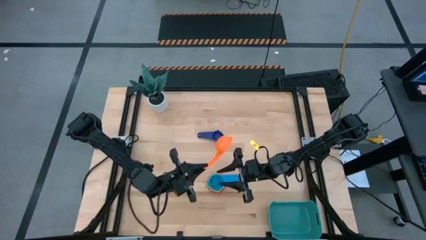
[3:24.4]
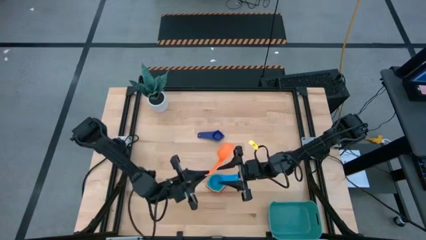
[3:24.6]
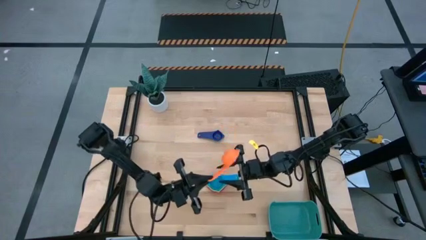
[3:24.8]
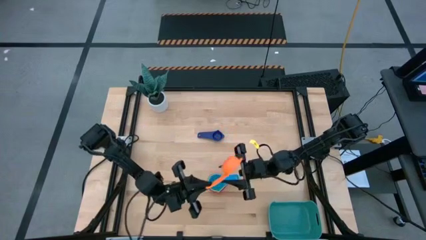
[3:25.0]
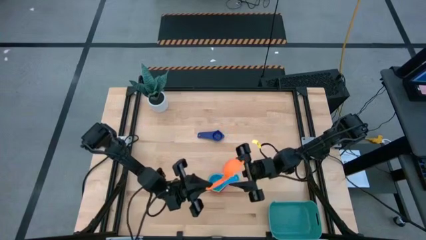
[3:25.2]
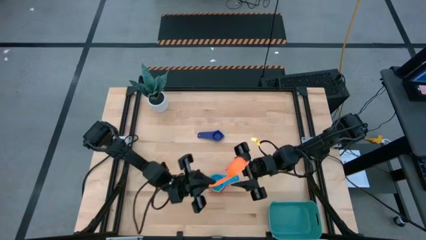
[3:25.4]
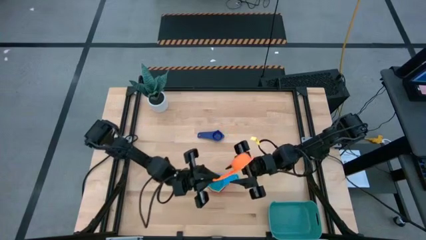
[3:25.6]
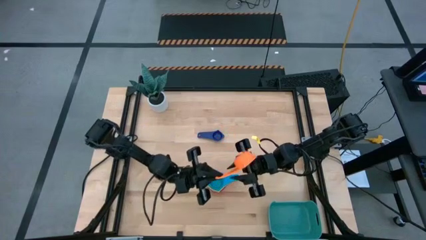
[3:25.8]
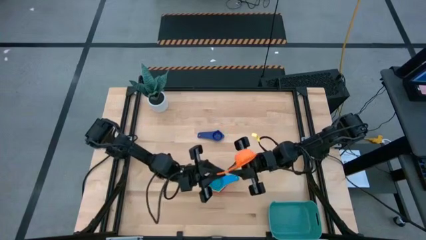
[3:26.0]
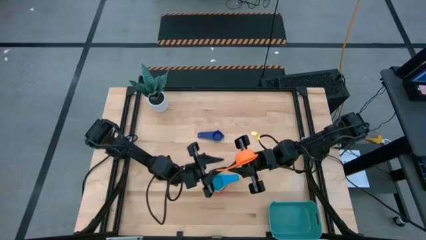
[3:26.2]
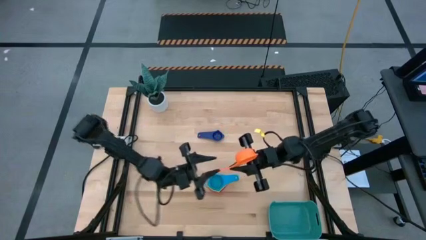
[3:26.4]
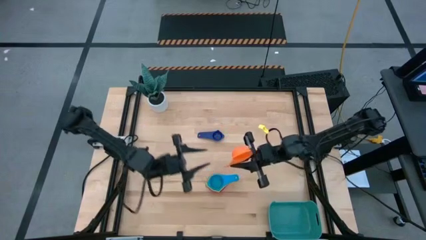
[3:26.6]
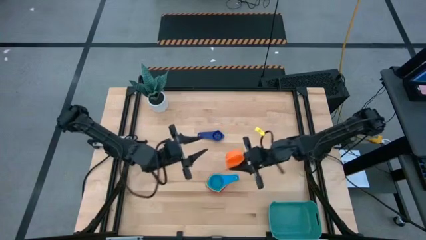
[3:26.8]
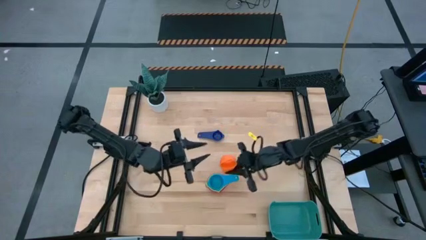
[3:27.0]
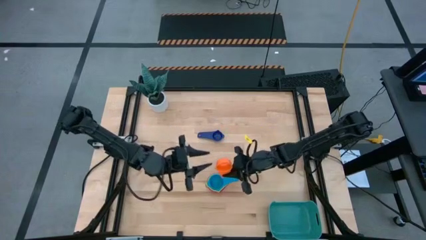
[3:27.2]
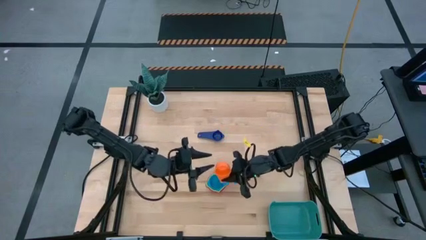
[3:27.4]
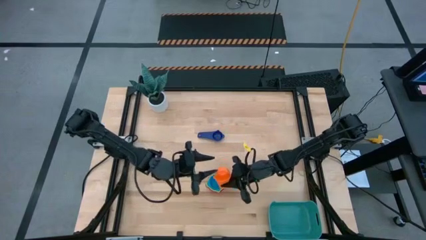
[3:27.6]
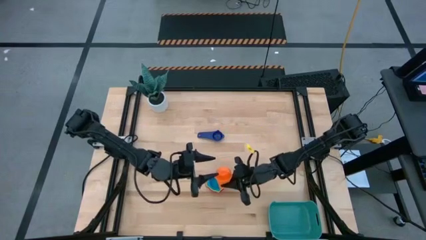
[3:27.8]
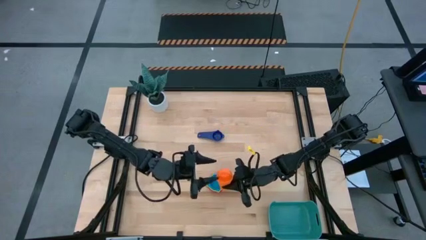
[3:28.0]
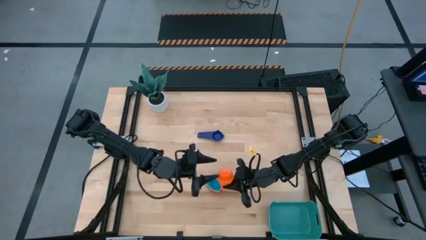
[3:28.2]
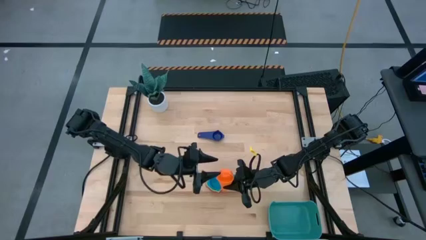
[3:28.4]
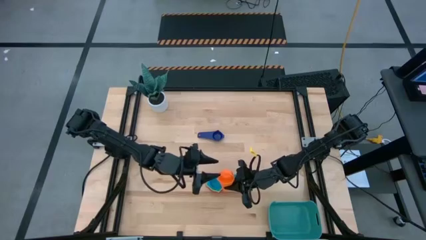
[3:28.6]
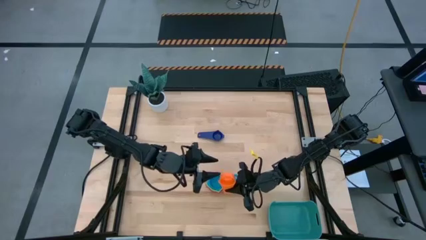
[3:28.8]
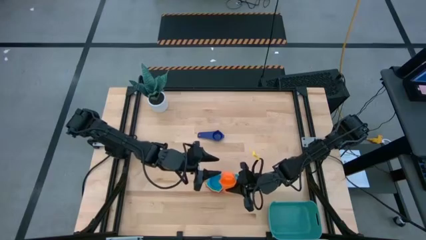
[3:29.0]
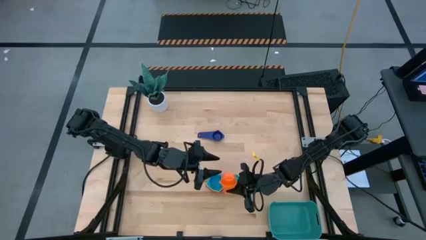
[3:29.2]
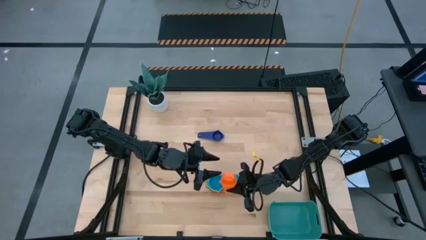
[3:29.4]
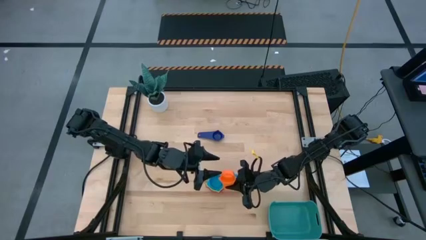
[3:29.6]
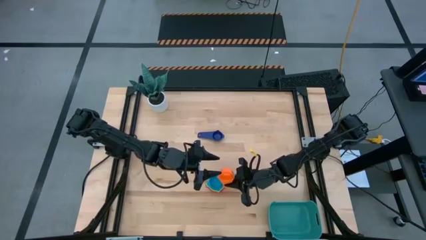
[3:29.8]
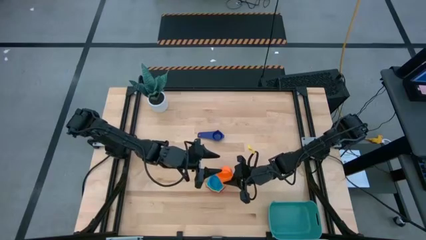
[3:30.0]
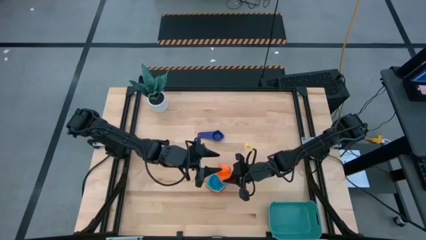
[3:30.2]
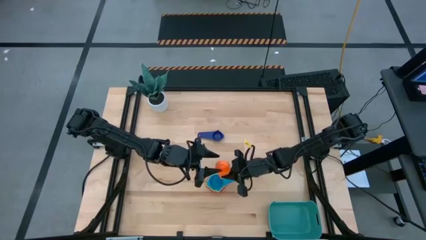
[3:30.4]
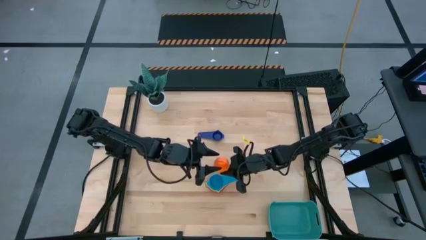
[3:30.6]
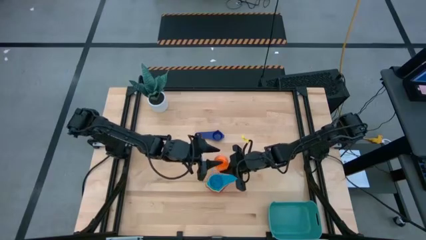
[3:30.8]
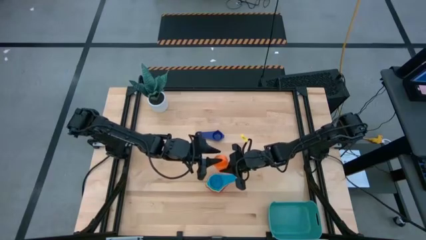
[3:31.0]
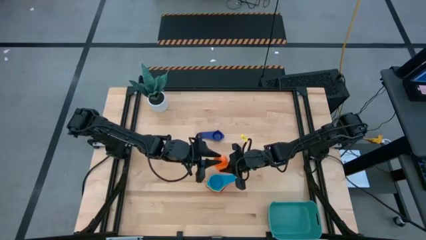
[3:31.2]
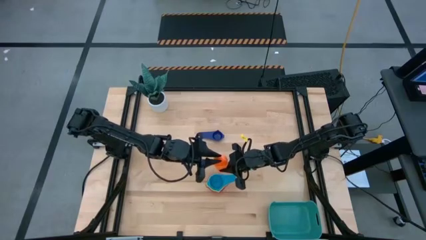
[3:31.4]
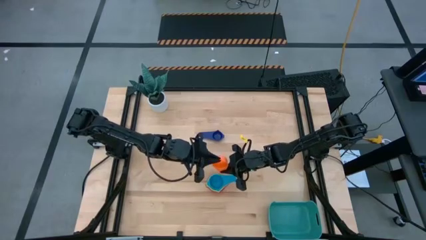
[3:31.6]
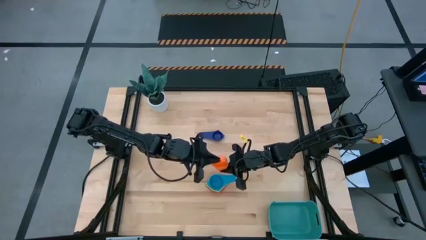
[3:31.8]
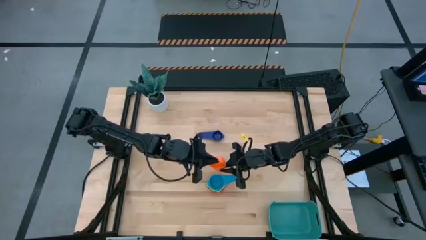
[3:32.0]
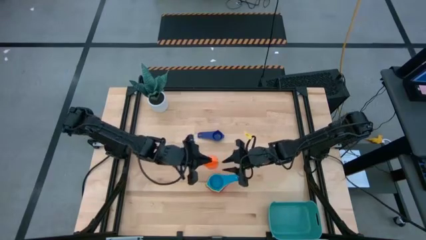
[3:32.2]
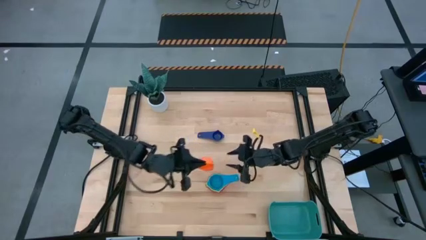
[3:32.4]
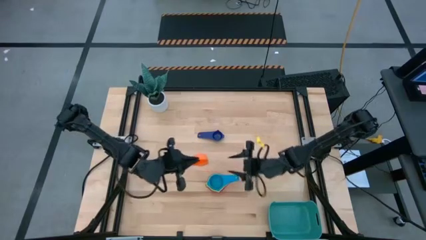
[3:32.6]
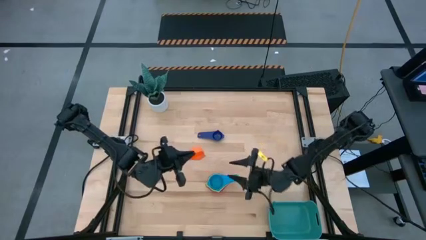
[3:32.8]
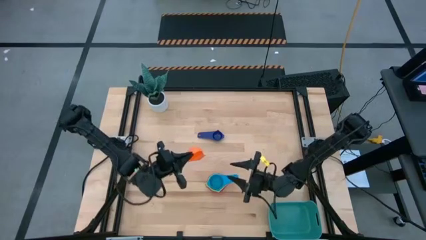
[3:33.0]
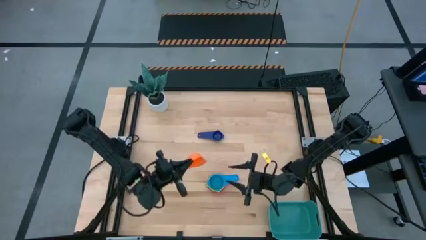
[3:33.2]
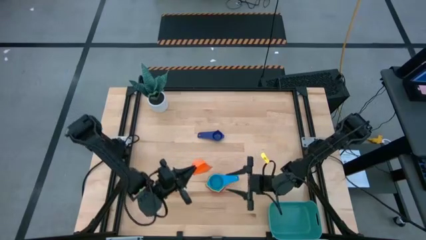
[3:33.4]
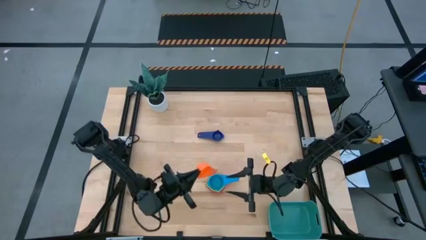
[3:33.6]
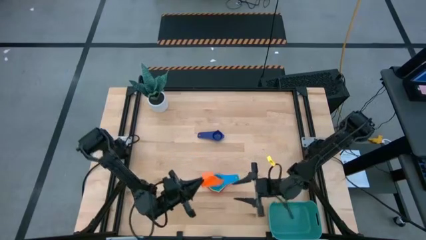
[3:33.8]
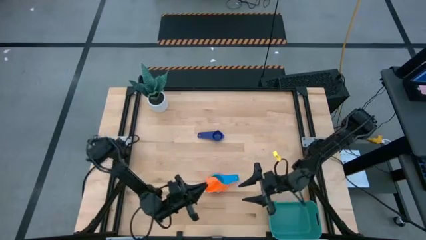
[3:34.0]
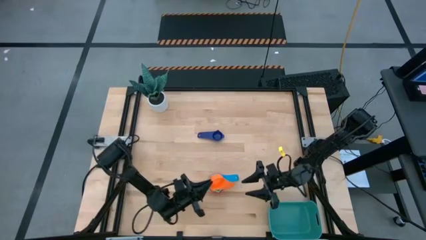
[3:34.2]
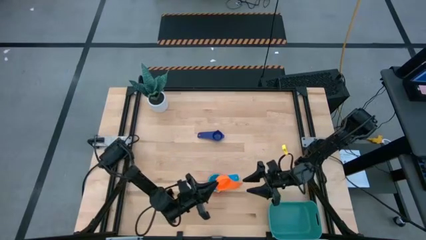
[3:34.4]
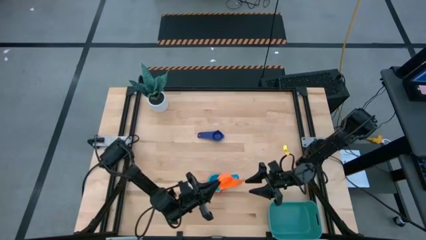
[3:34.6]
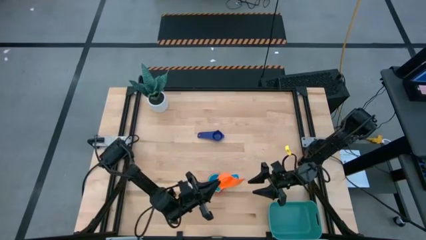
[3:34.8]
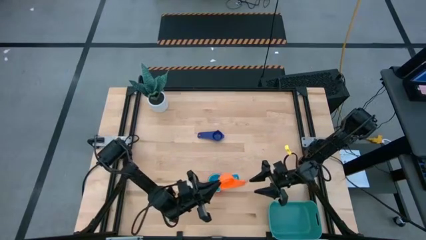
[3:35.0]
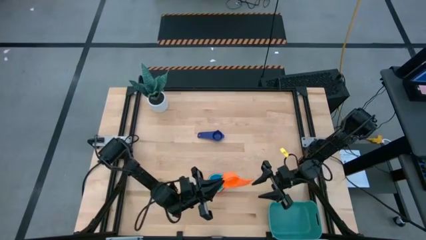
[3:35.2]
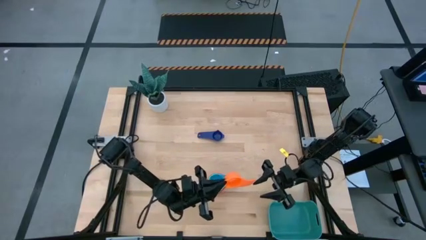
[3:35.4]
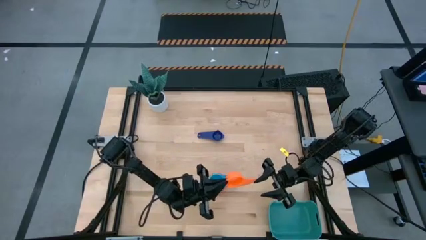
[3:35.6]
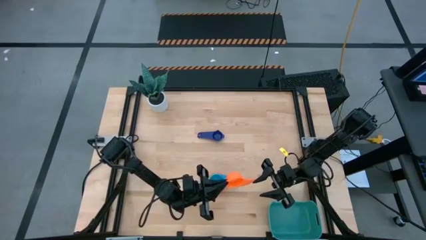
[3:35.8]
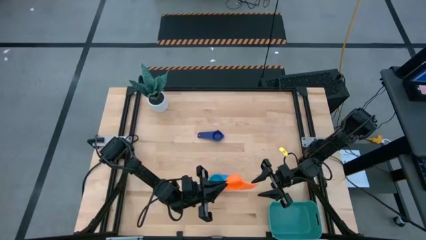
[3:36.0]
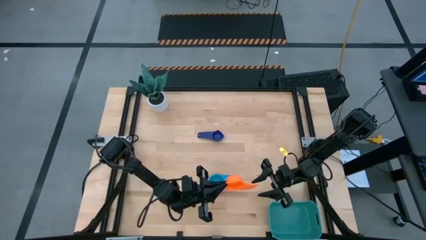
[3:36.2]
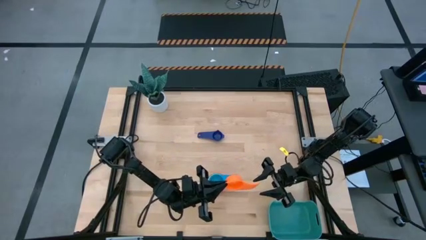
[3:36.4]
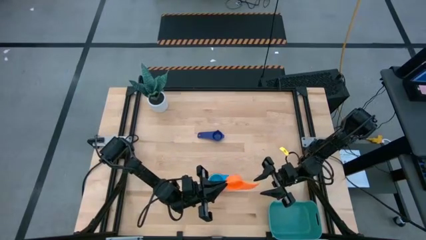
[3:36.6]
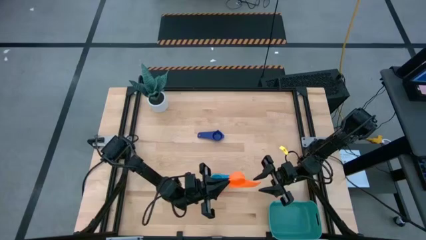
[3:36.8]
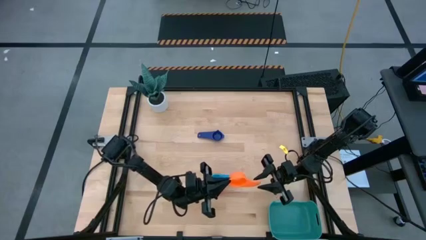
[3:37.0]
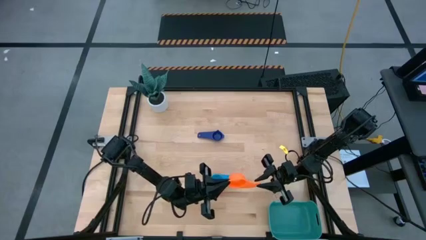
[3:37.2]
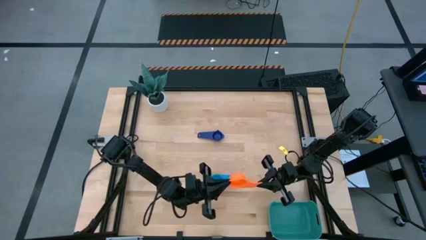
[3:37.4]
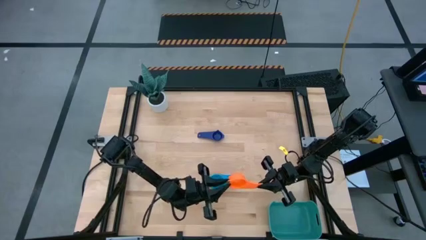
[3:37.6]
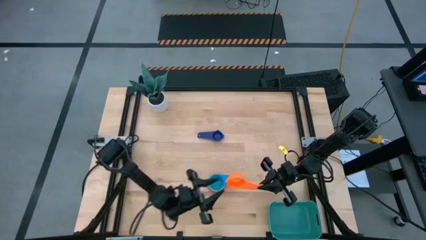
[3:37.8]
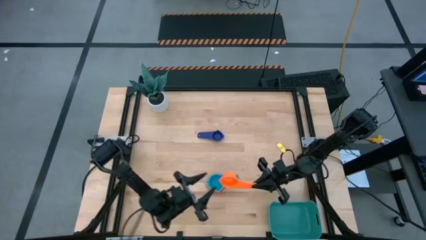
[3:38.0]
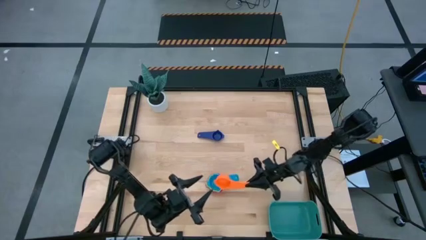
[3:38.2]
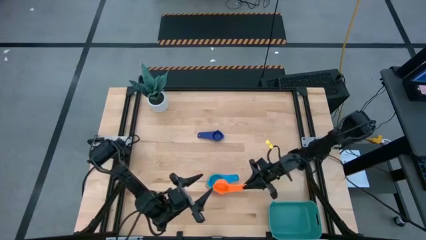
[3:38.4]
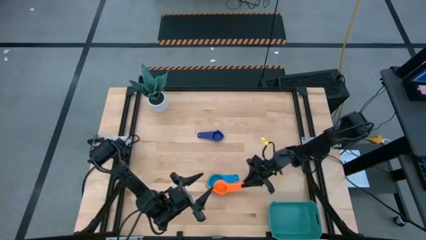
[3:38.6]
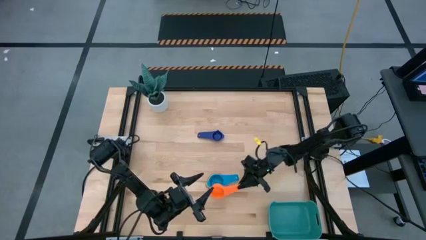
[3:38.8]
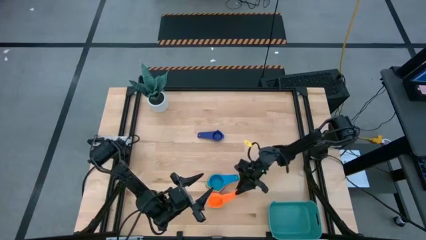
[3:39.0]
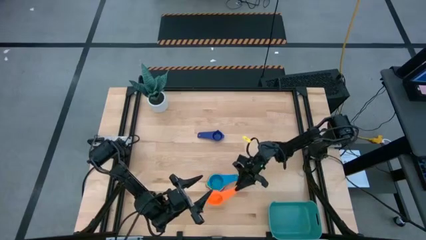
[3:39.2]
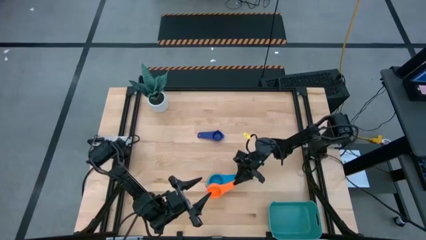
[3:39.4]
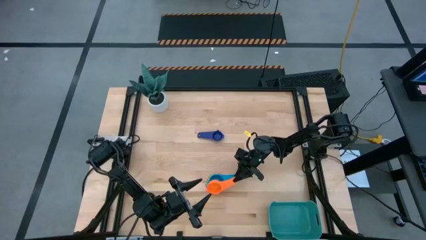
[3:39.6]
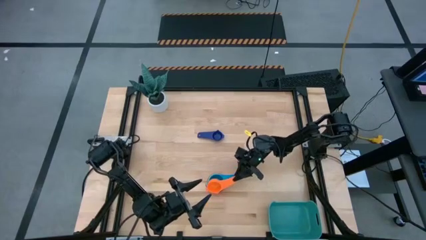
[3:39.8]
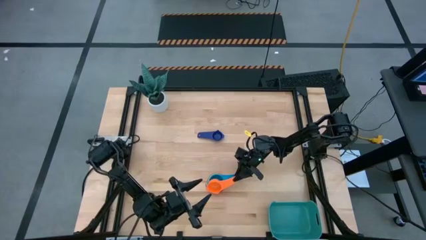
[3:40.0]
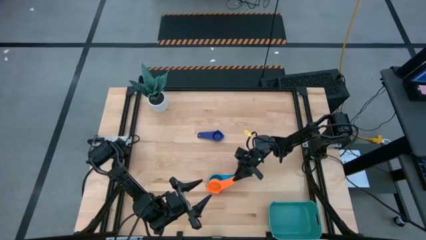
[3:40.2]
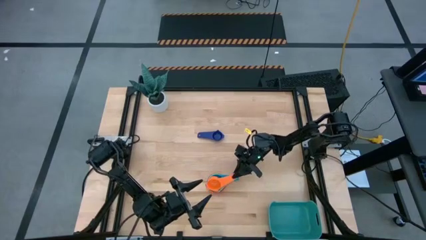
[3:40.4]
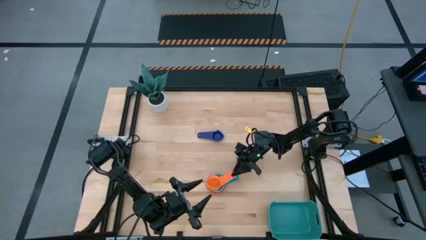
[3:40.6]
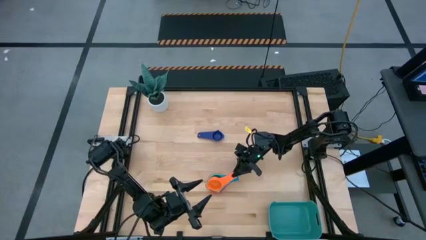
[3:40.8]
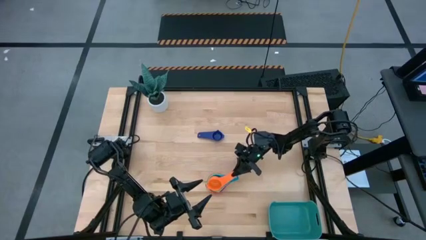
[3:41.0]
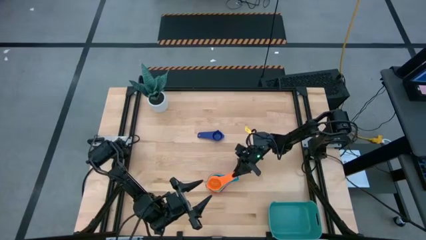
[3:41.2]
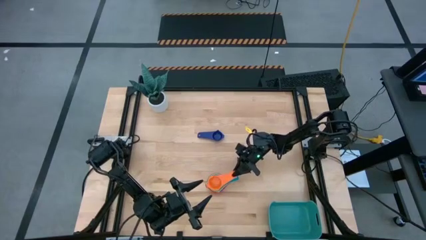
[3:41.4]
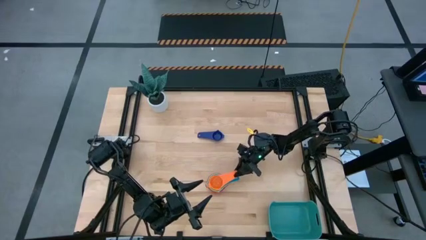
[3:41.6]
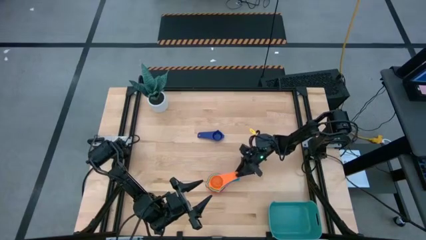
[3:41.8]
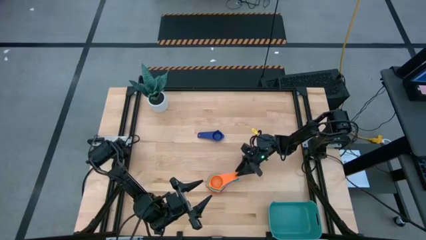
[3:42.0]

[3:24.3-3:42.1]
Task: Nest measuring cups in basket
Stack the orange measuring cup on top of the light blue measuring cup
